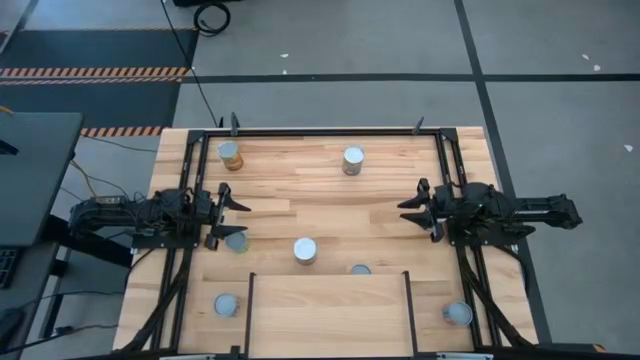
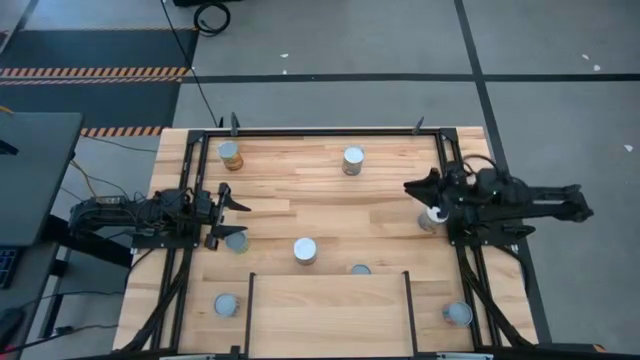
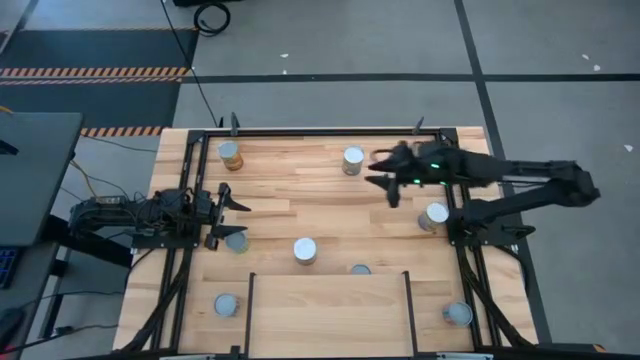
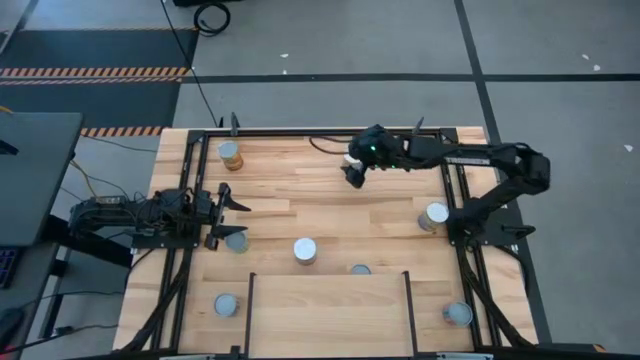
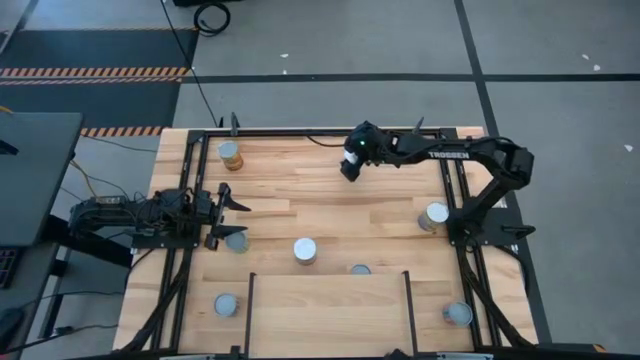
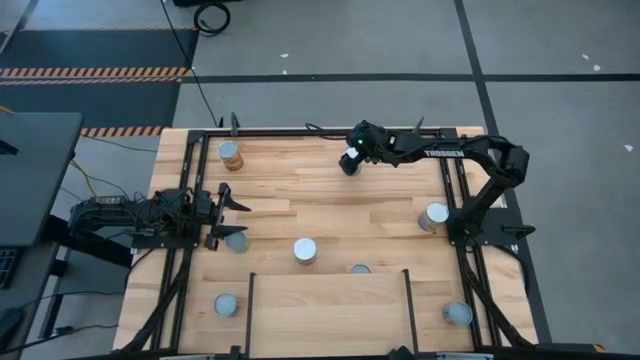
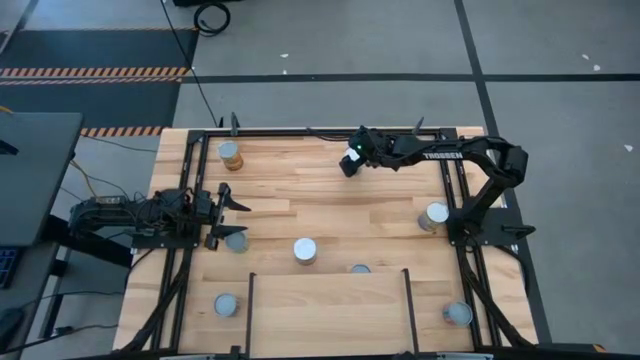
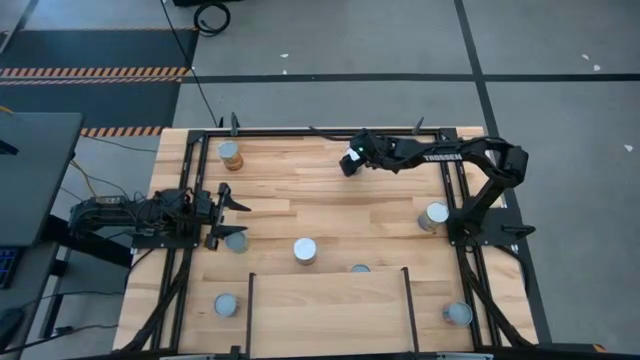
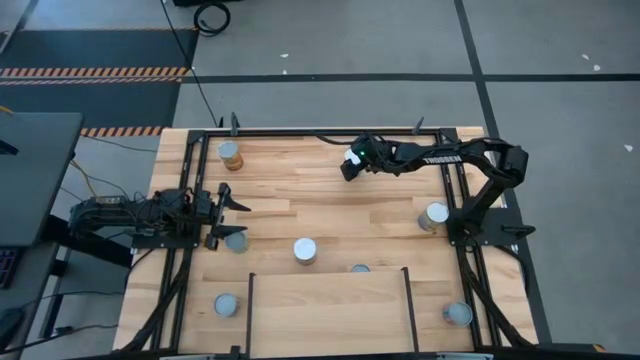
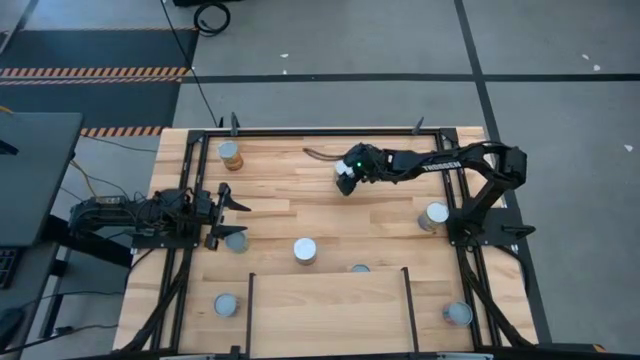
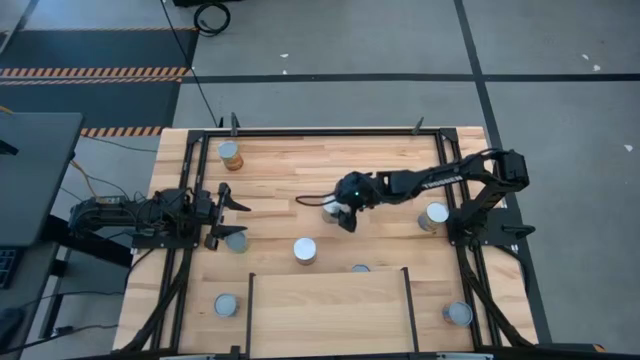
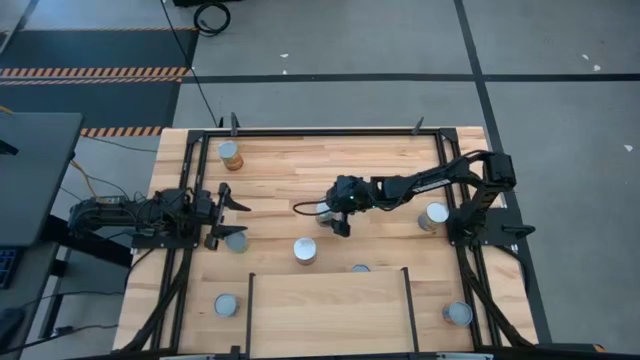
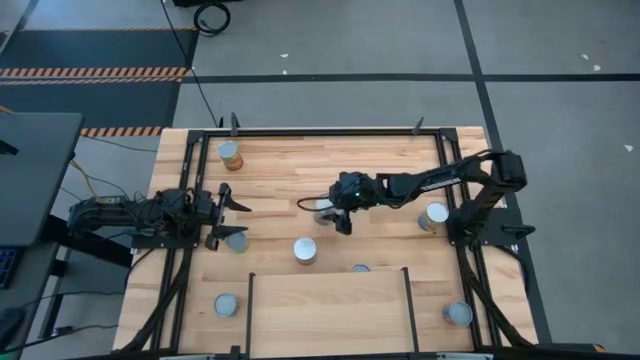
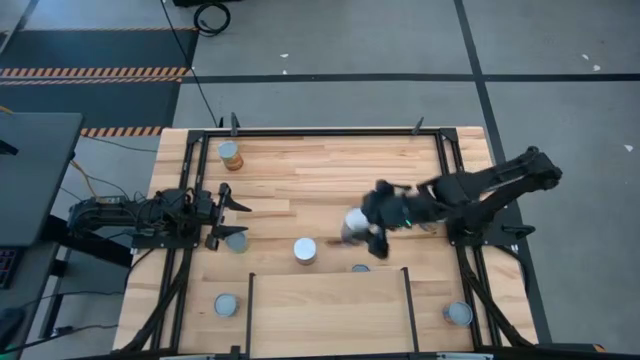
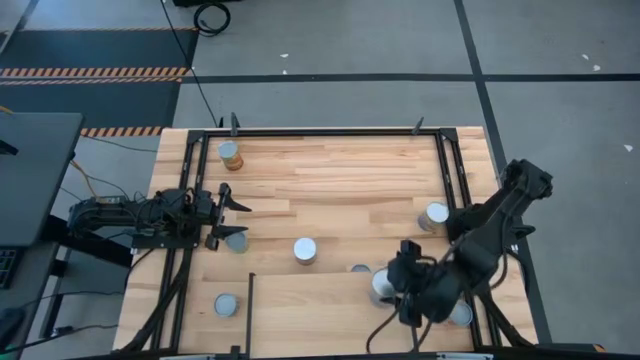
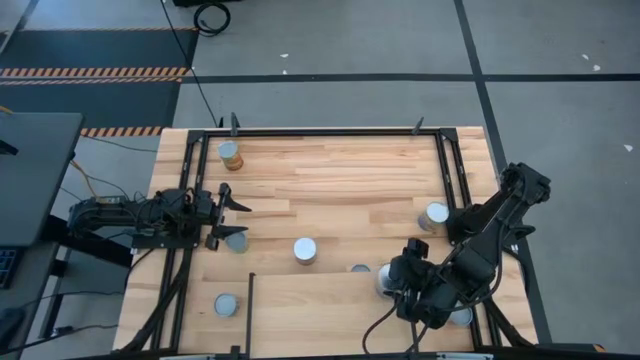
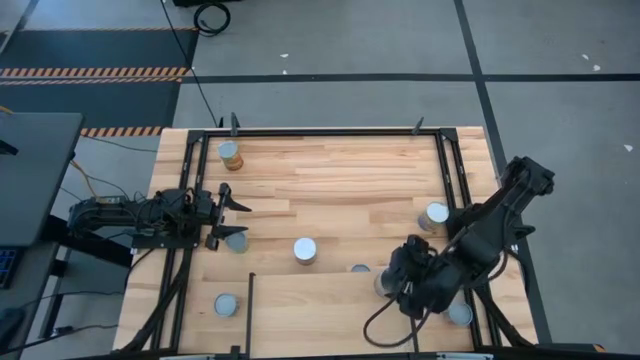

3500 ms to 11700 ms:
Task: Pick and place cans onto a shelf
Put the top canned peaches on the shelf

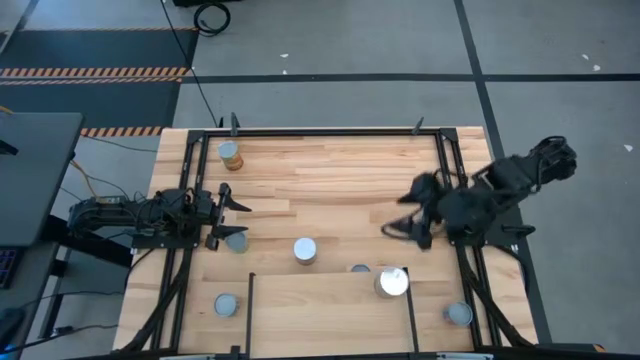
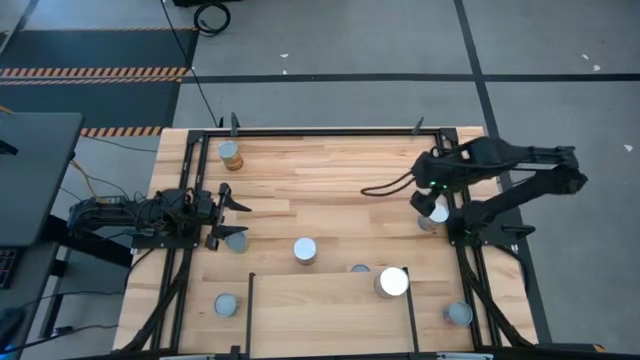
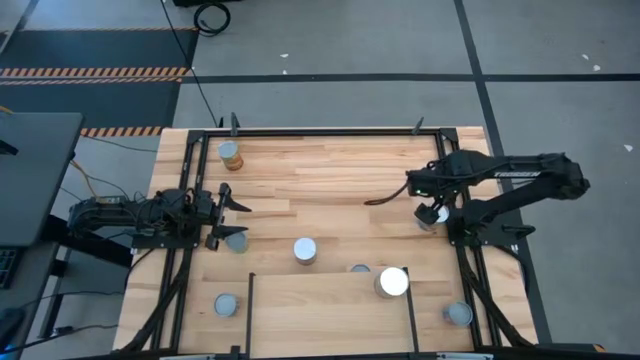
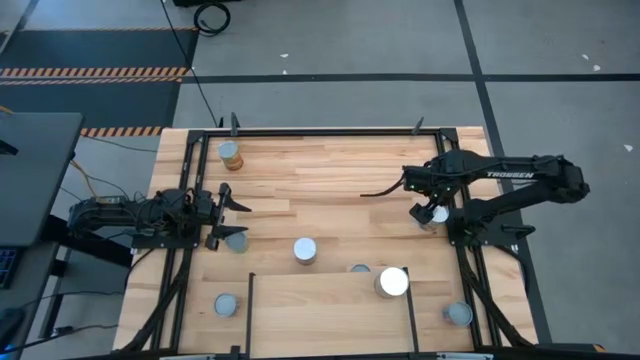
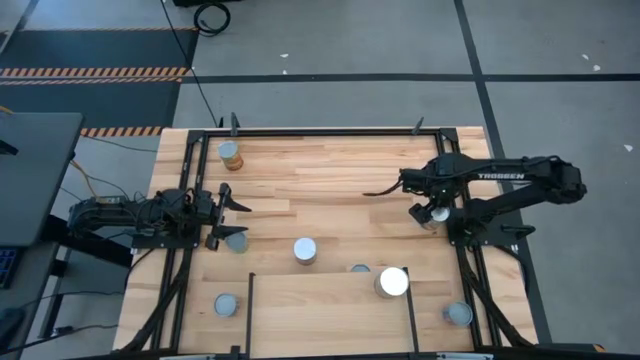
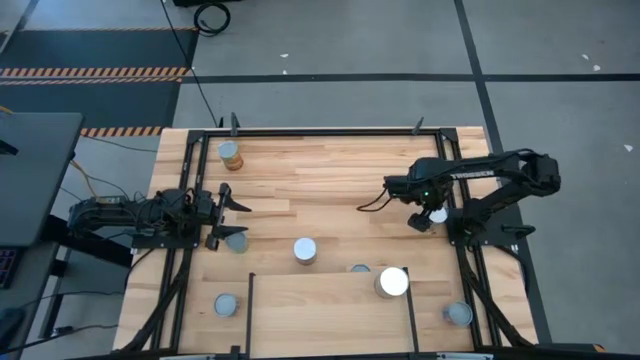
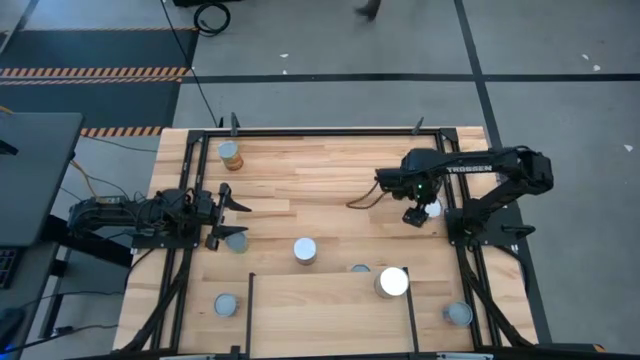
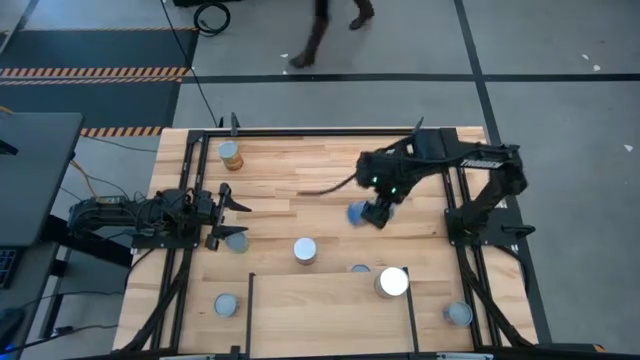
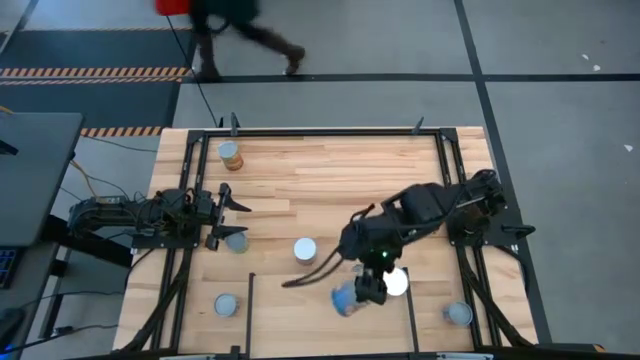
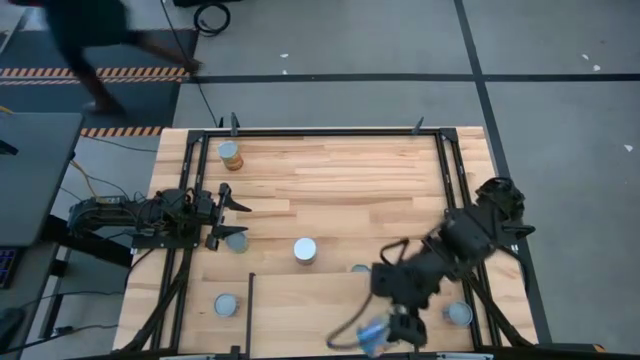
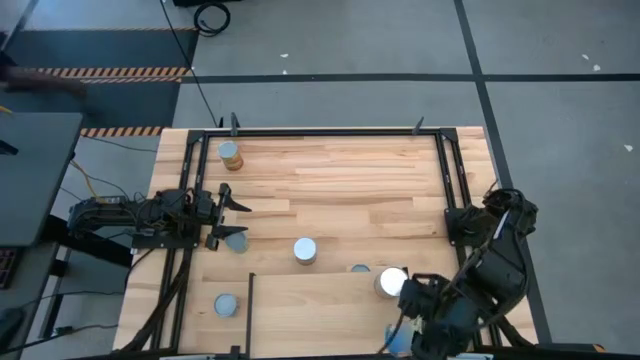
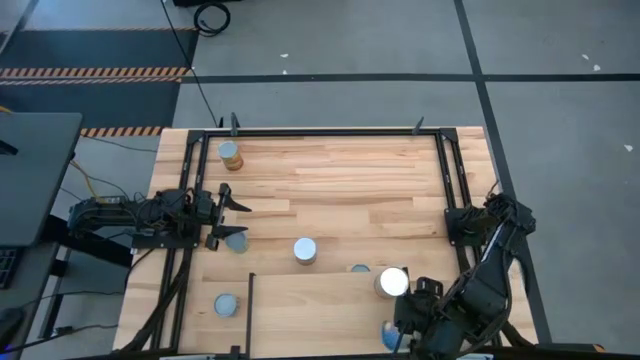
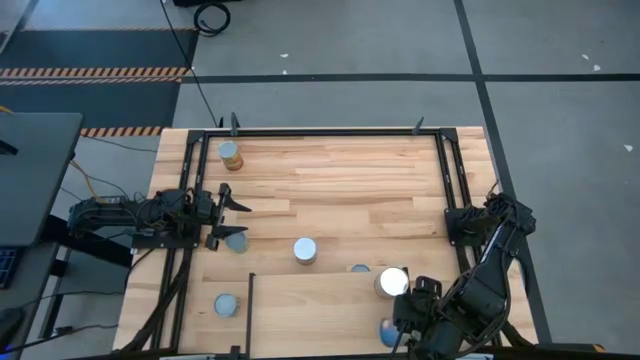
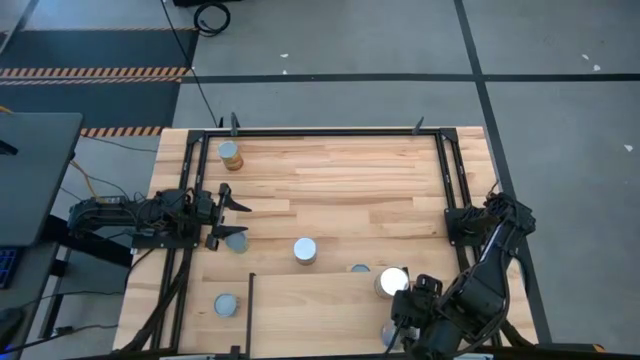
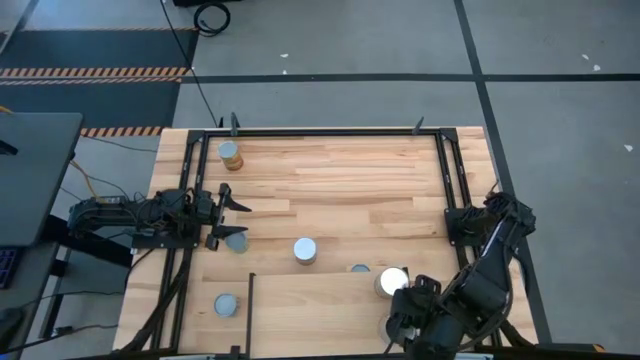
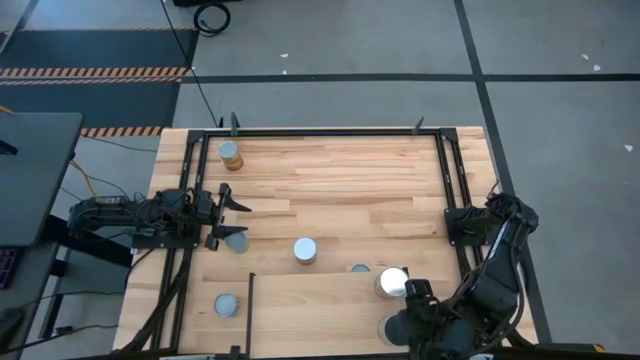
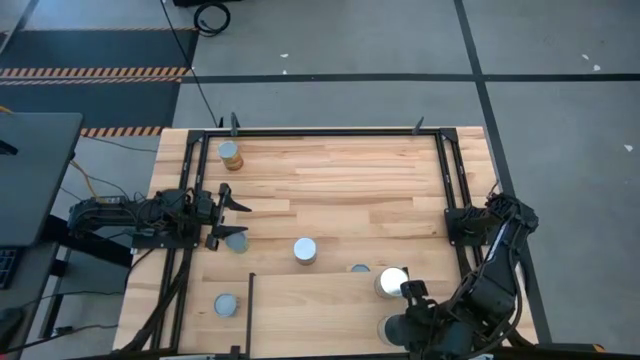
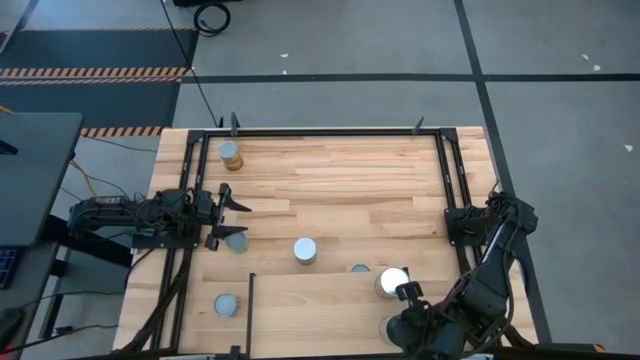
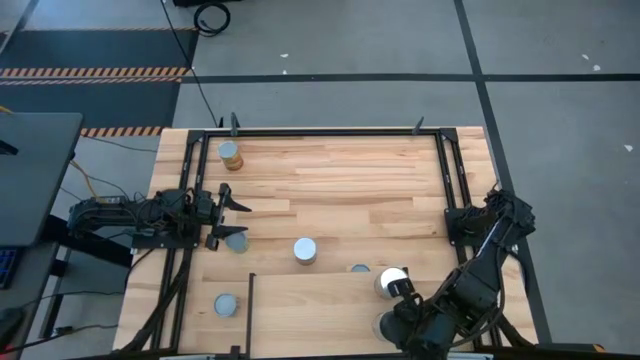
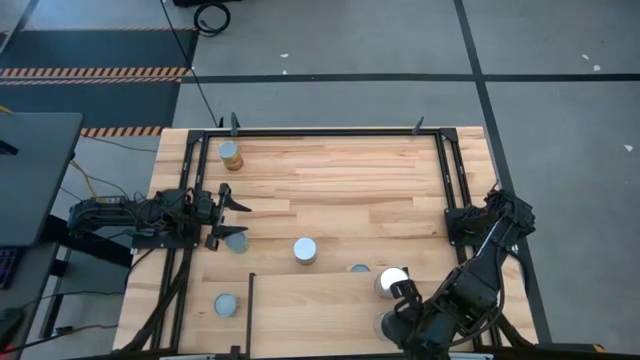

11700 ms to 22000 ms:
Put the canned peaches on the shelf

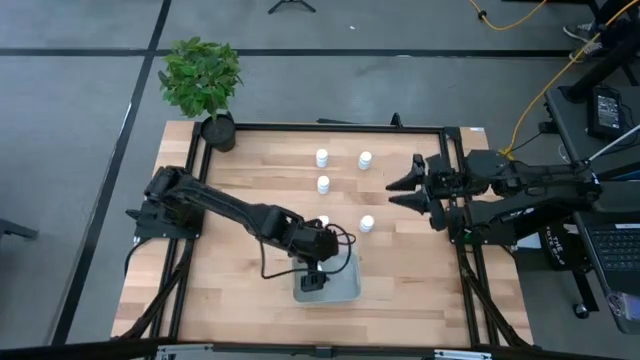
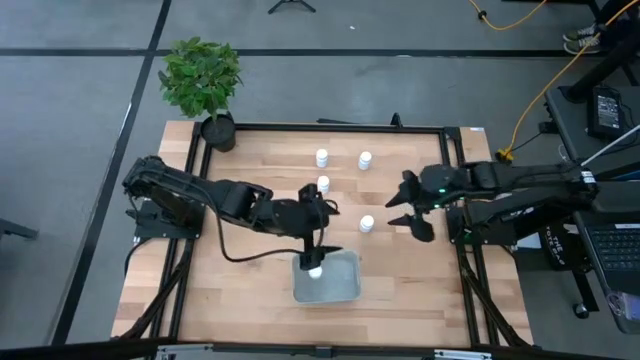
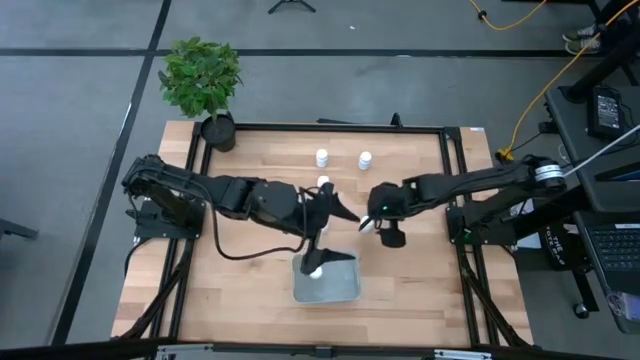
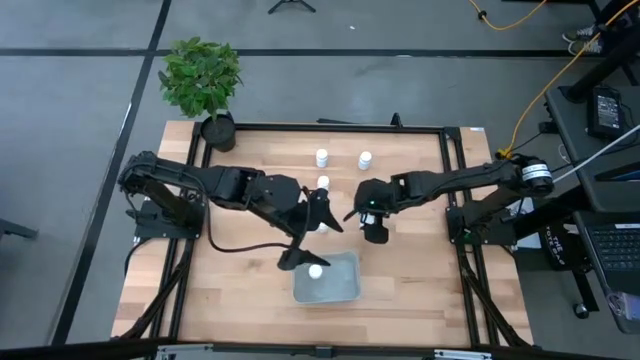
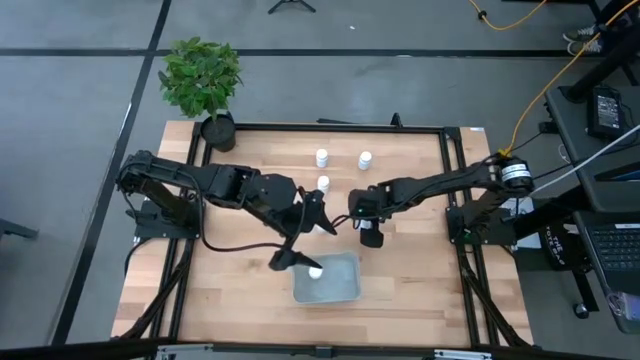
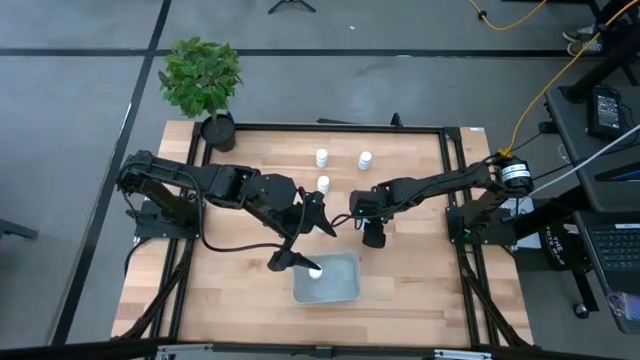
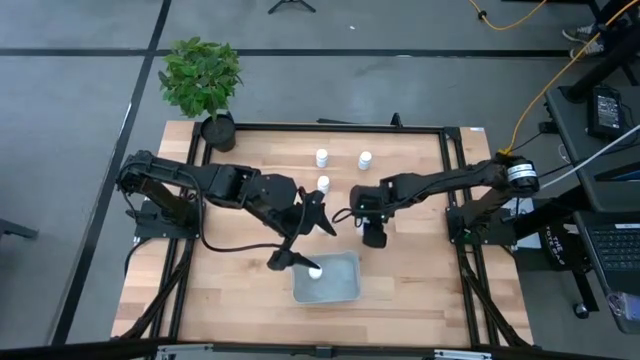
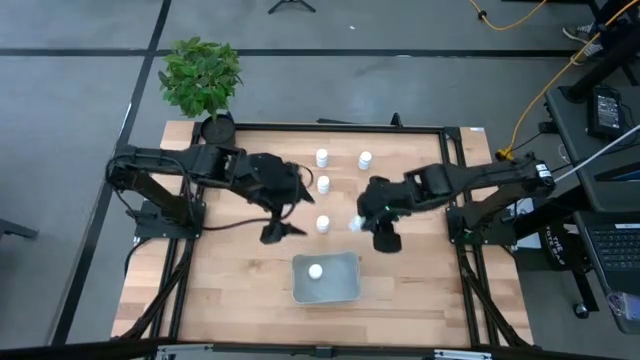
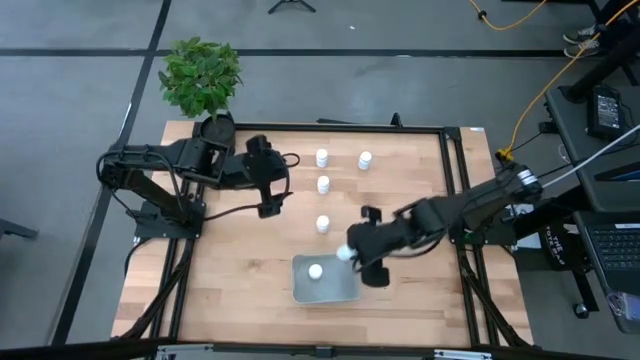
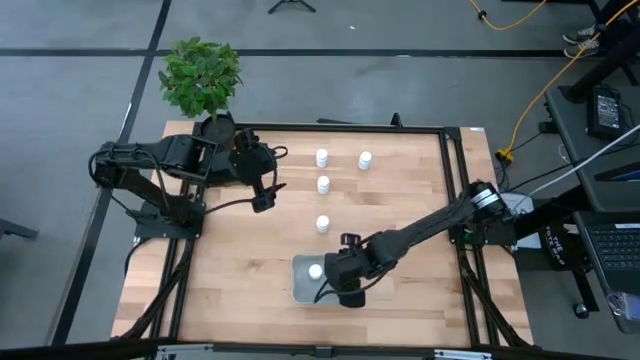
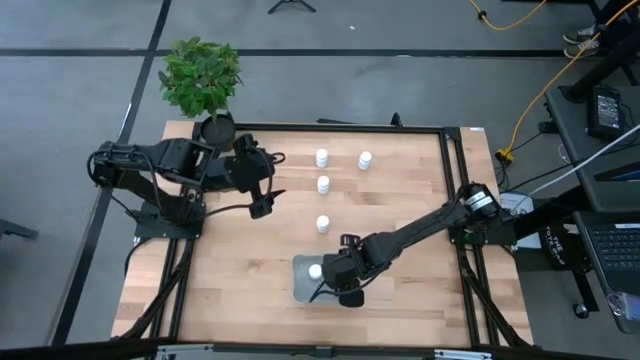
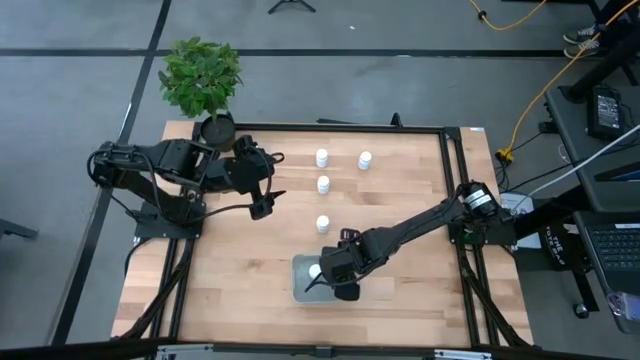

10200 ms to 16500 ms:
Task: Pick and place pill bottles into a basket
Put the white medicine bottle into the gray bin
